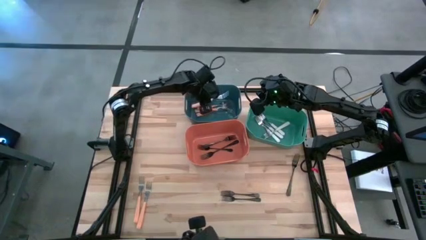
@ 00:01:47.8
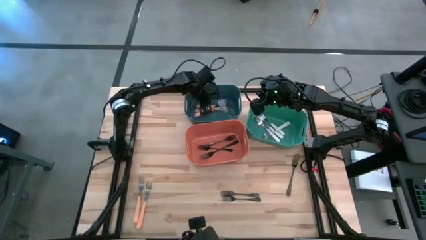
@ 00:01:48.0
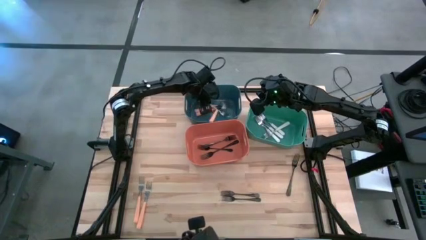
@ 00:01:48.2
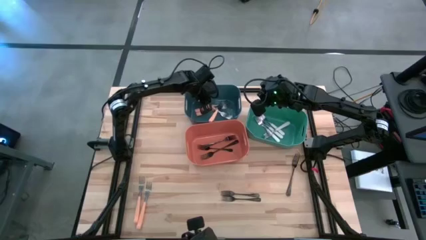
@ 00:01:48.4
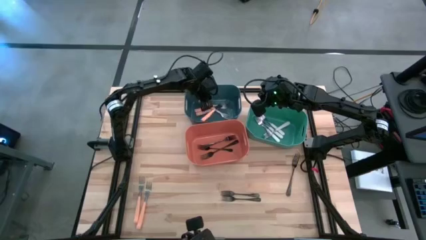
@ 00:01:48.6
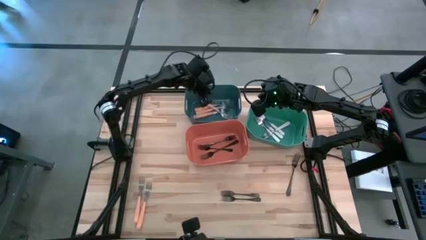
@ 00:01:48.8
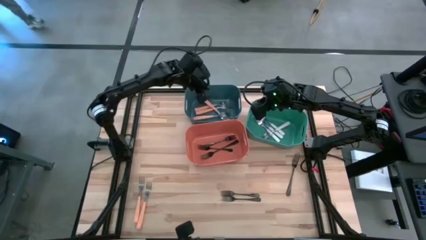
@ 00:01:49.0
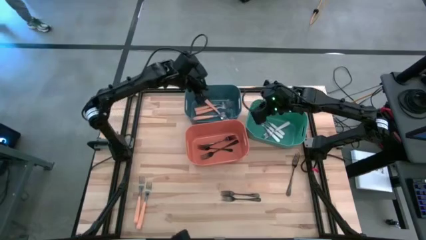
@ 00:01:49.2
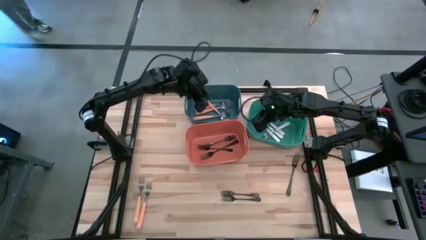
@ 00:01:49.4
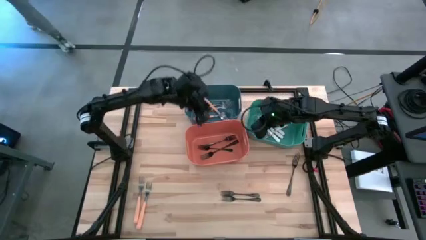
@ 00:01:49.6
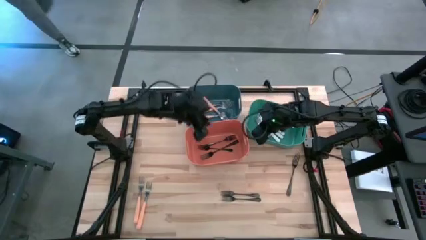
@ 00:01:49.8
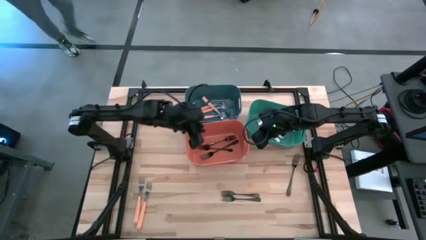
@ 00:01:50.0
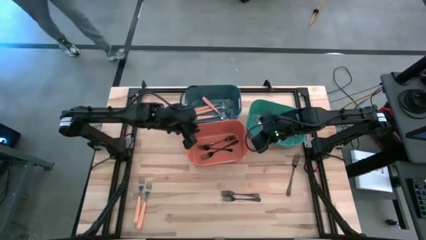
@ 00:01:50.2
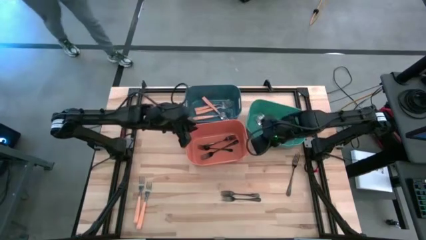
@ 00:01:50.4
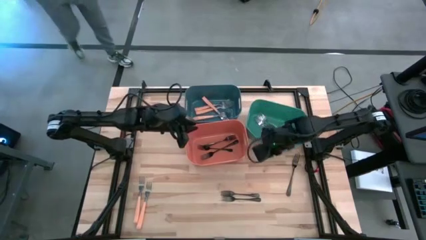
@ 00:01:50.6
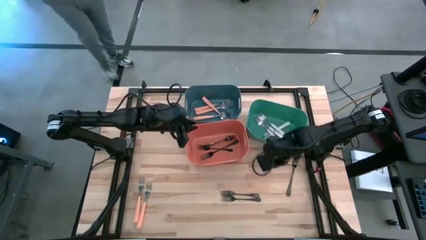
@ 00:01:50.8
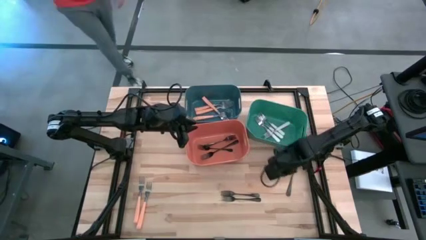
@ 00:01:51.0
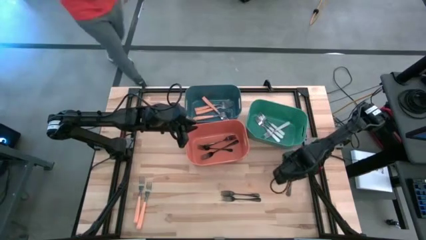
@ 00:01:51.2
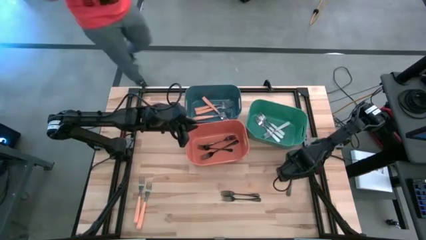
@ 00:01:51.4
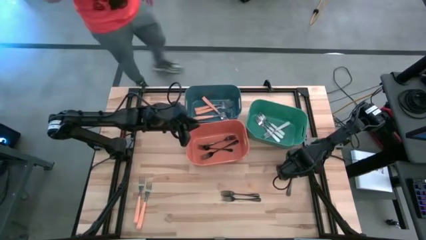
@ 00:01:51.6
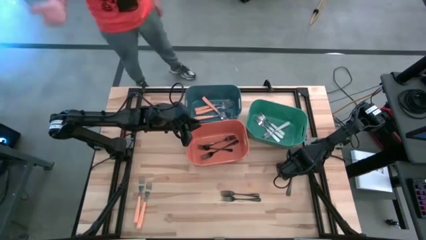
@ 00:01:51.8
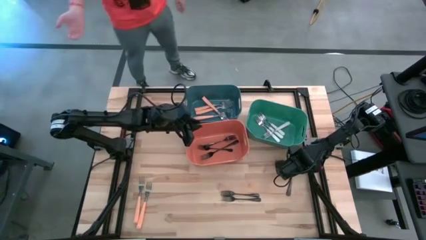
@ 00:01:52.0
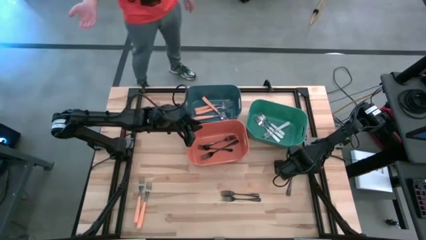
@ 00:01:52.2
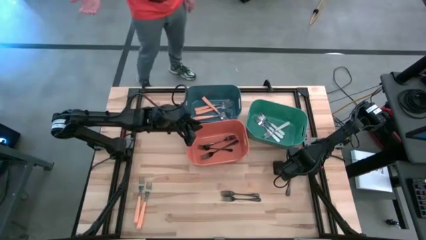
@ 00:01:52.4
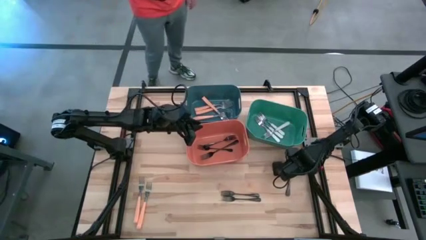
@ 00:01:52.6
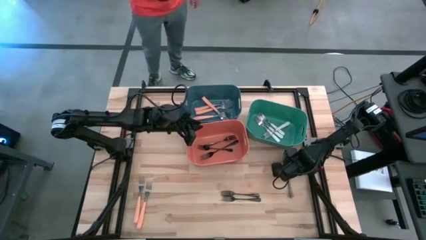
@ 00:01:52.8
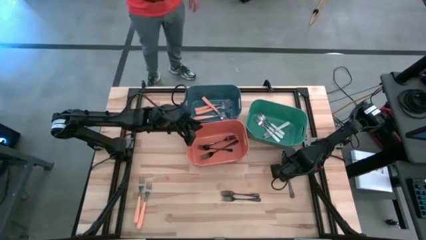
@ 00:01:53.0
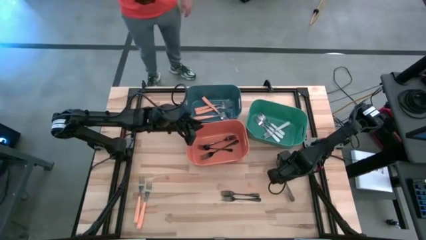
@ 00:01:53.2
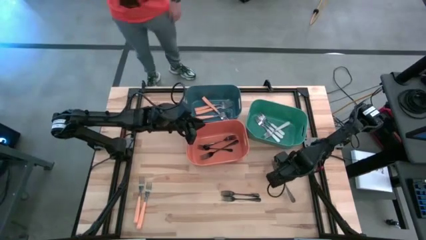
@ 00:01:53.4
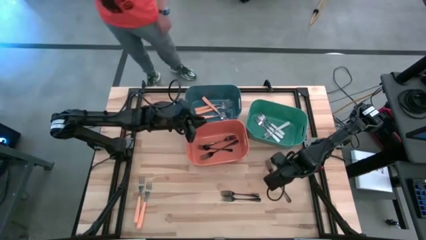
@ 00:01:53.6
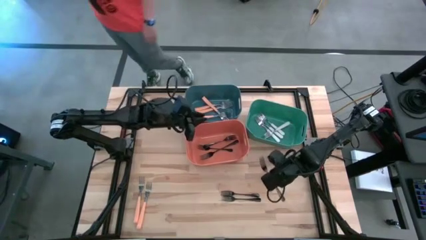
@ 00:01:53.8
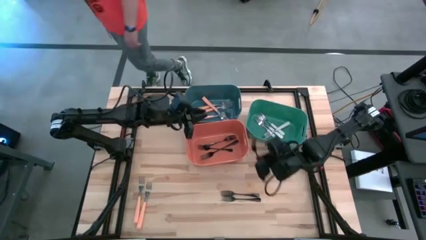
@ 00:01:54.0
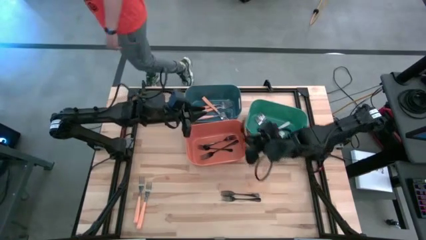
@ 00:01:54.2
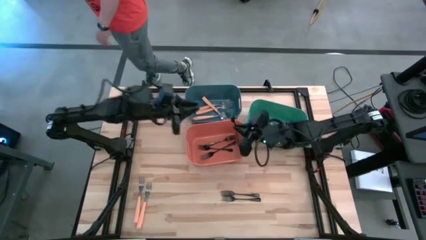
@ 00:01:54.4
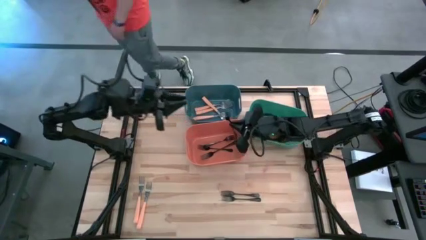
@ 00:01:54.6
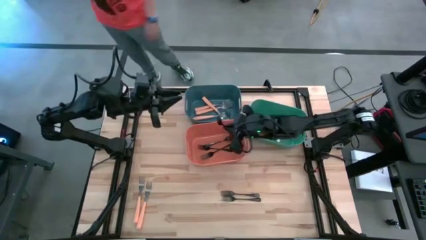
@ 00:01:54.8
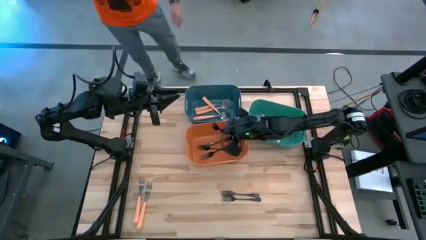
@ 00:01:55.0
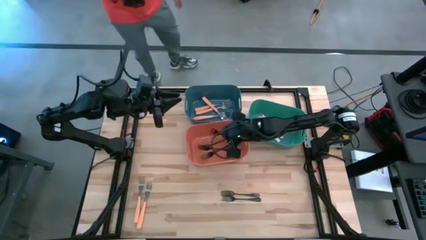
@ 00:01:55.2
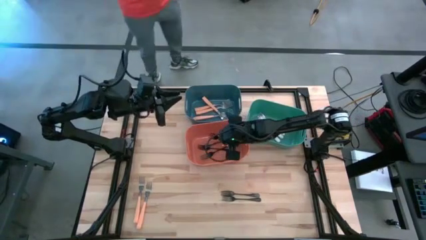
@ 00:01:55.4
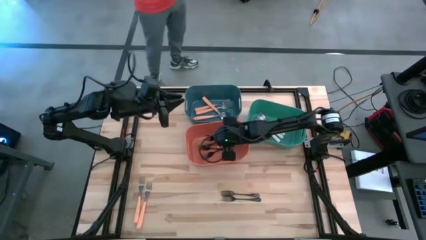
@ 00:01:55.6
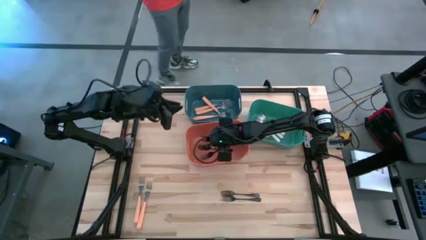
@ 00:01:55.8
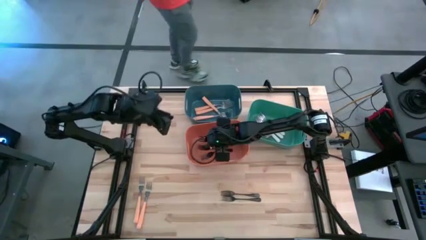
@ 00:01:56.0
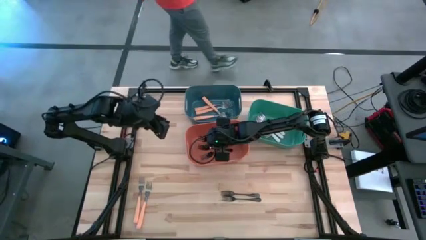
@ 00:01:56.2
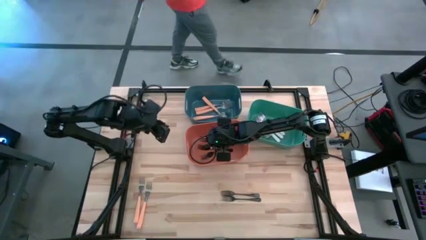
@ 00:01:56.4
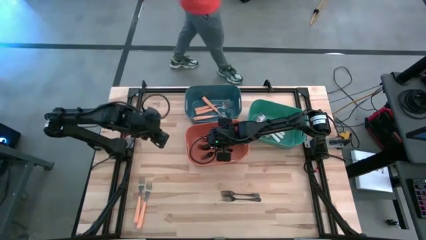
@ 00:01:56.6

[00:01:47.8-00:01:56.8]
Task: Sort silverware by color (type)
Put the black fork into the orange bin

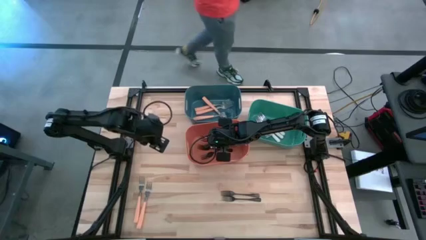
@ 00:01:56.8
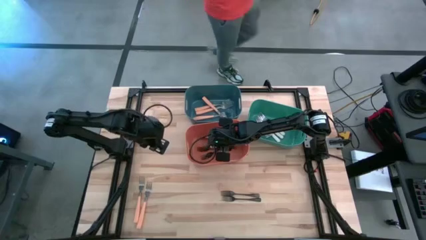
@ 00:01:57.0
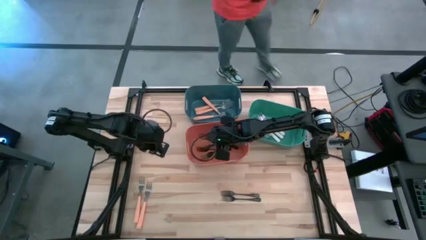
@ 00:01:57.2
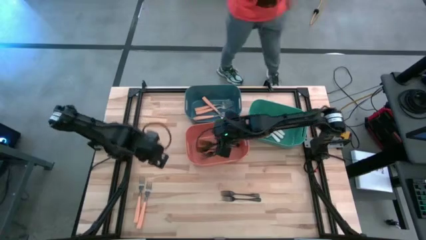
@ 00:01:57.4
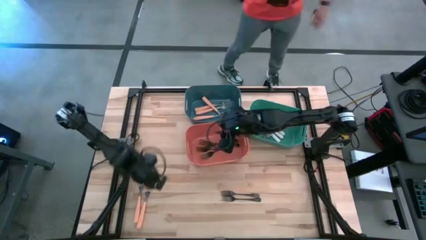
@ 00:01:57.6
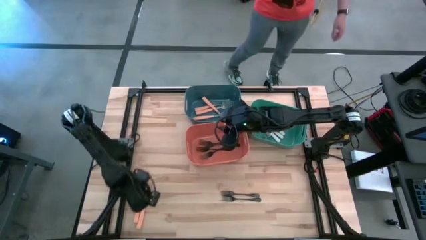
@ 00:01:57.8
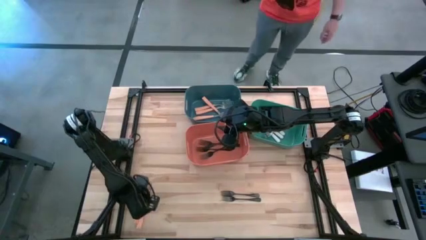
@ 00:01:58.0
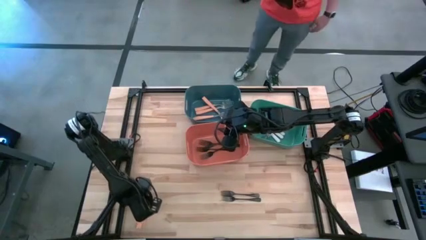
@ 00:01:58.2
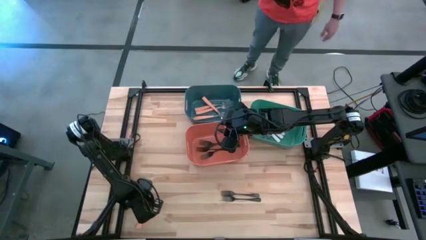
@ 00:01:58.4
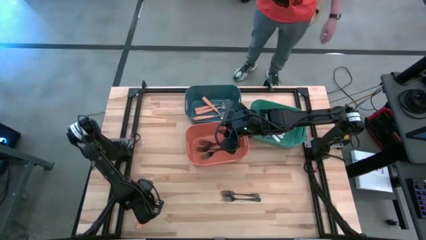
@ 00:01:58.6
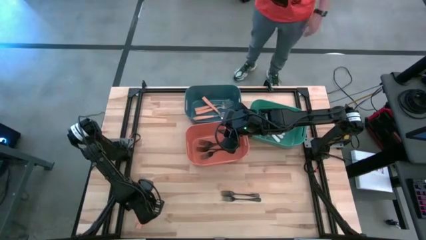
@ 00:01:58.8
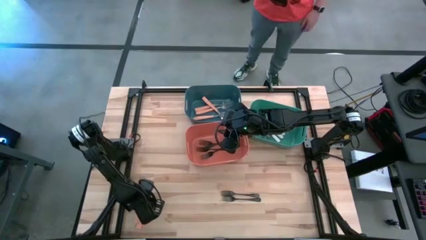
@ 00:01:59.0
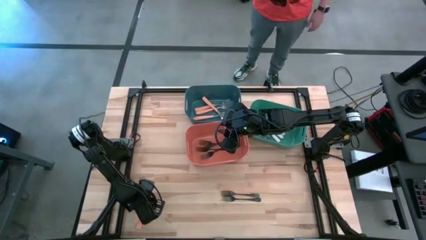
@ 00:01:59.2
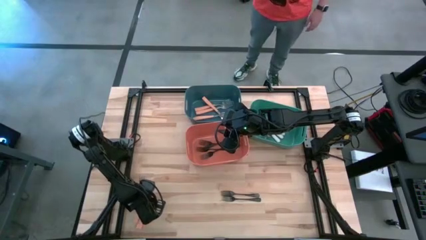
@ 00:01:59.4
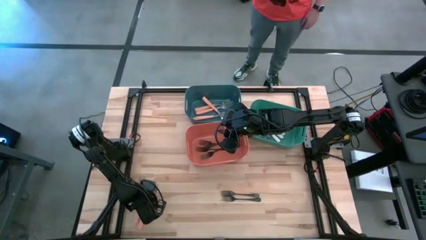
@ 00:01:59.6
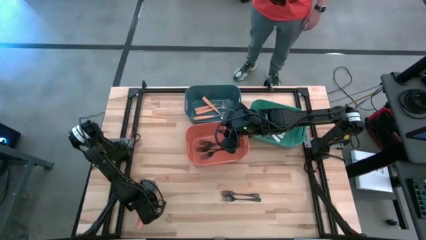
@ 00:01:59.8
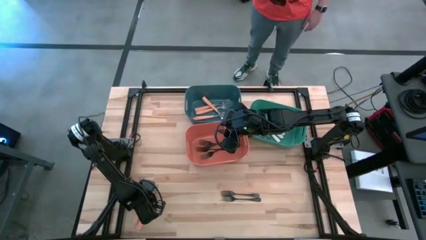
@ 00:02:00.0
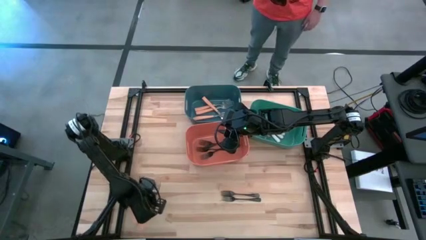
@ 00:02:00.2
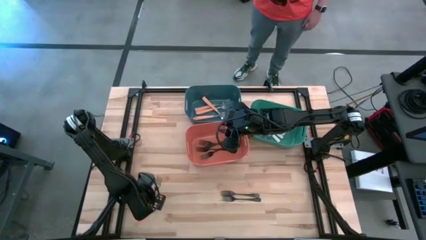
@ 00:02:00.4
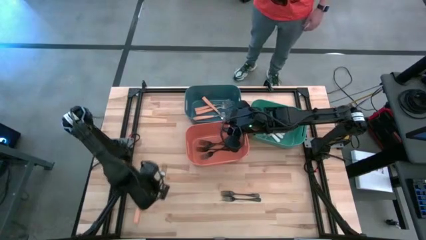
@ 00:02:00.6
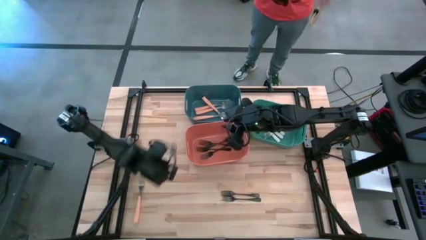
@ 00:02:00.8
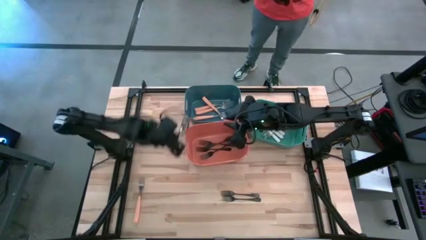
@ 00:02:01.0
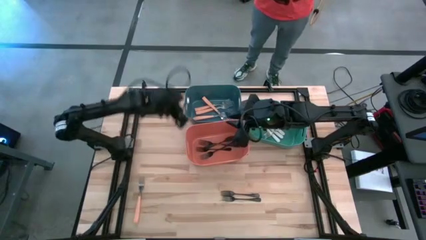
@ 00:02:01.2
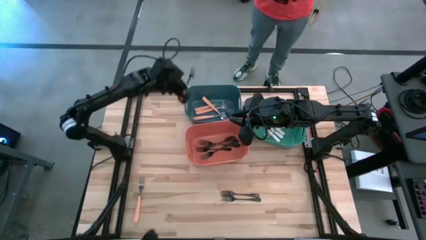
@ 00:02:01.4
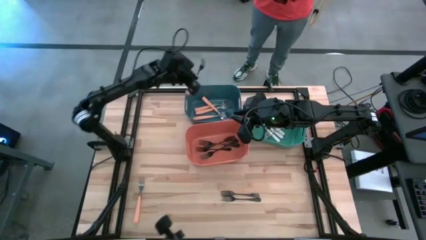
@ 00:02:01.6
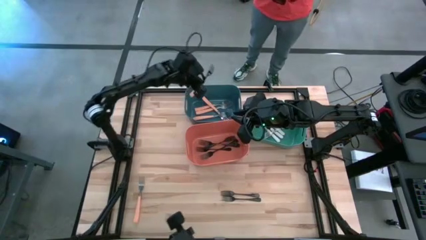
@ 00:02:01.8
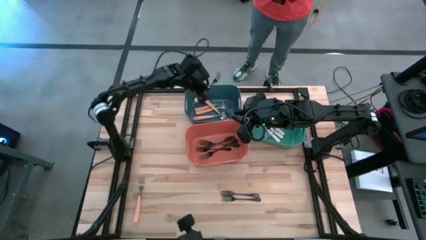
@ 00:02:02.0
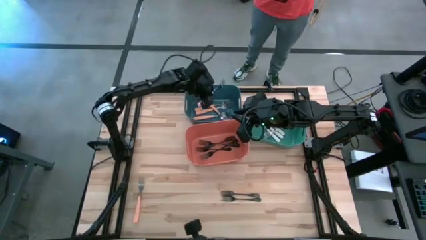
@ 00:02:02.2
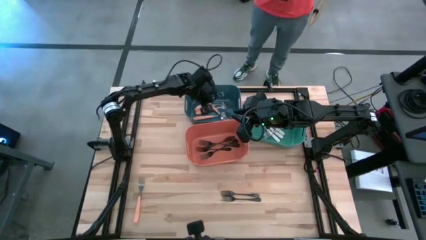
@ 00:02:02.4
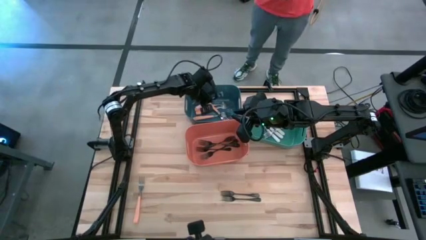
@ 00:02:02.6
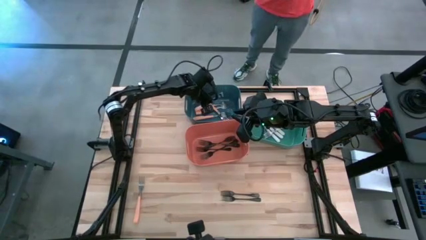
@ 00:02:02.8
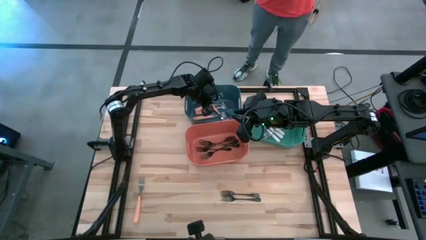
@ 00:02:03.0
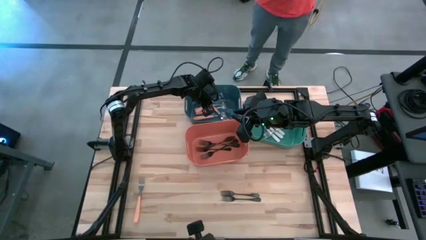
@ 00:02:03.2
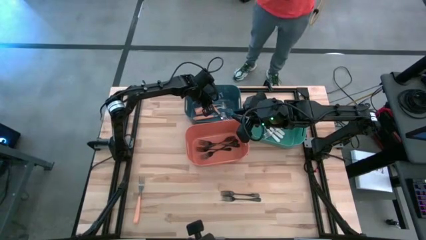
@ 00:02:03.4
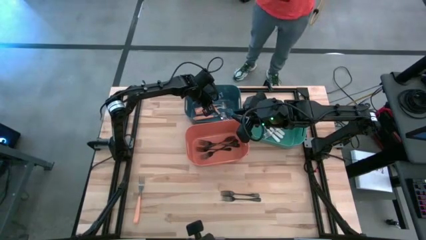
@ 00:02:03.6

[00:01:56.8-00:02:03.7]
Put the orange fork into the blue bin
